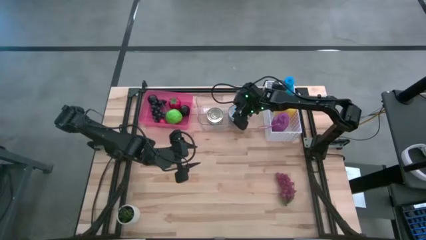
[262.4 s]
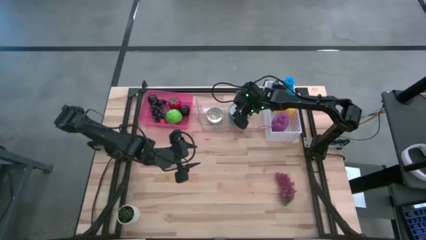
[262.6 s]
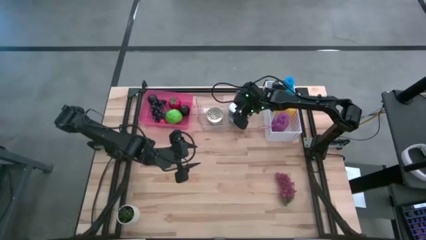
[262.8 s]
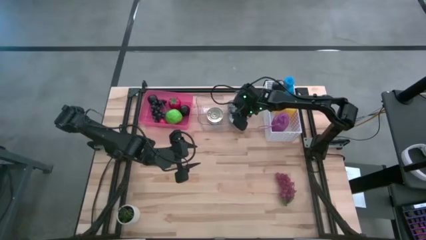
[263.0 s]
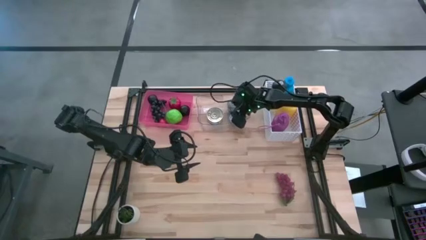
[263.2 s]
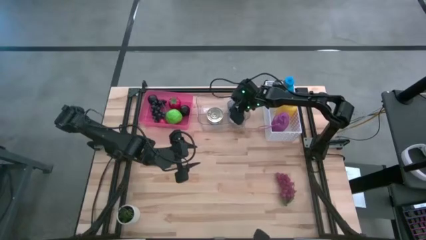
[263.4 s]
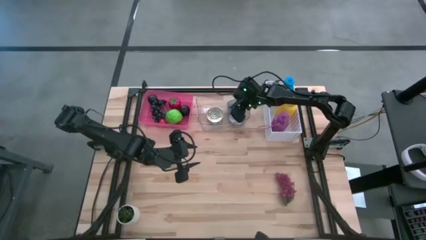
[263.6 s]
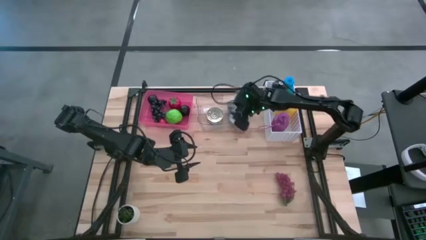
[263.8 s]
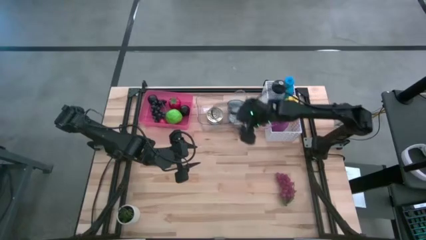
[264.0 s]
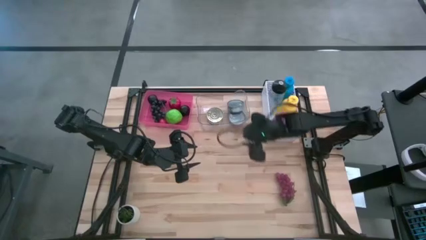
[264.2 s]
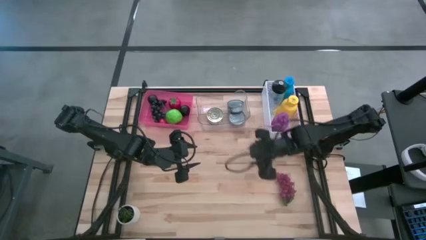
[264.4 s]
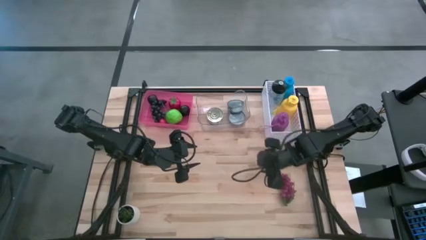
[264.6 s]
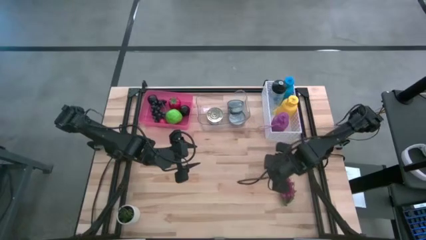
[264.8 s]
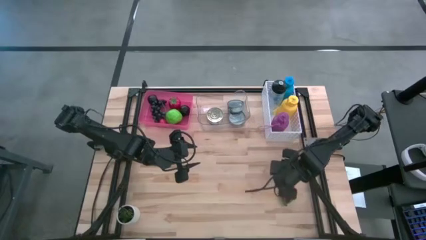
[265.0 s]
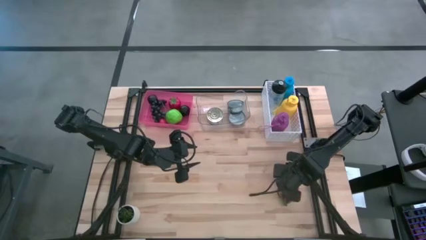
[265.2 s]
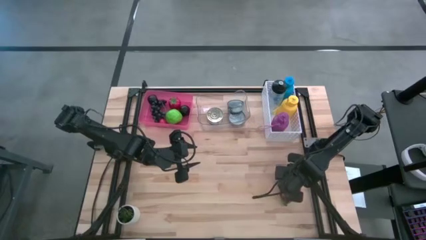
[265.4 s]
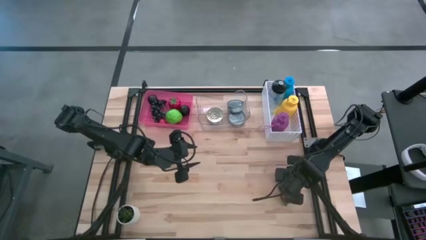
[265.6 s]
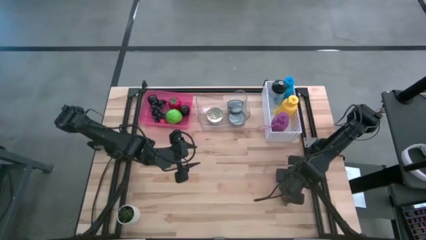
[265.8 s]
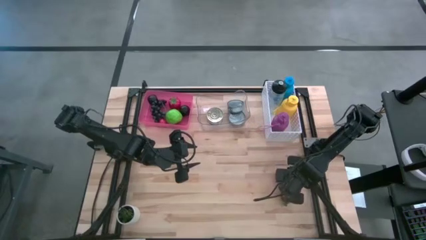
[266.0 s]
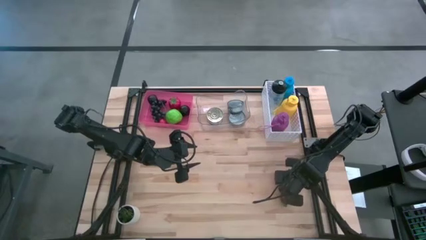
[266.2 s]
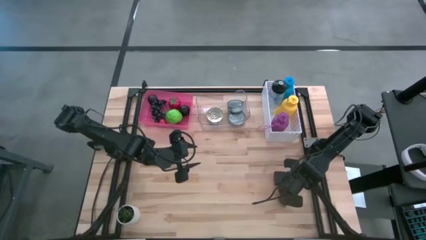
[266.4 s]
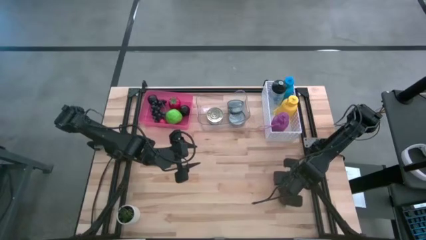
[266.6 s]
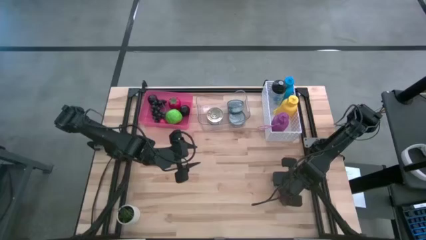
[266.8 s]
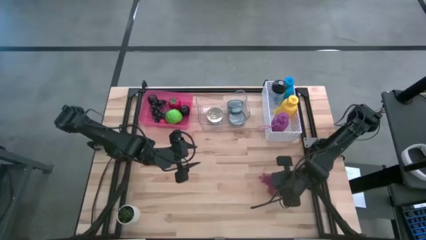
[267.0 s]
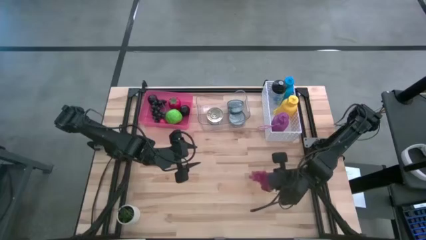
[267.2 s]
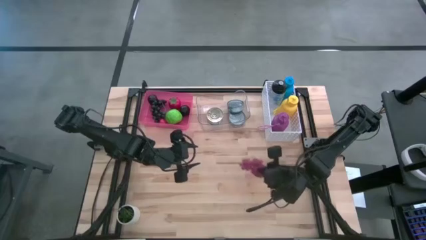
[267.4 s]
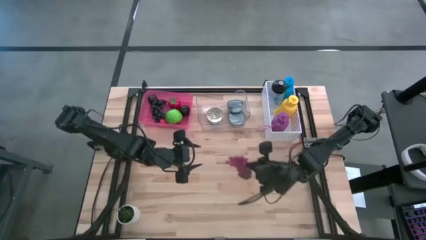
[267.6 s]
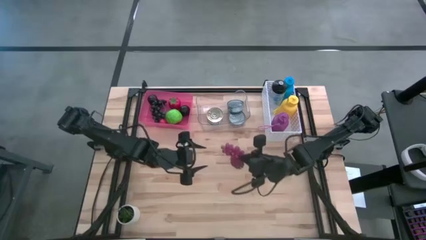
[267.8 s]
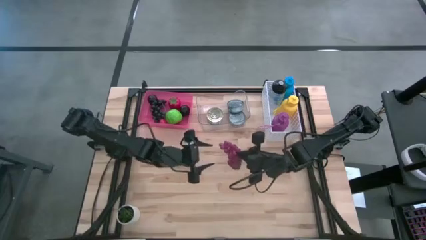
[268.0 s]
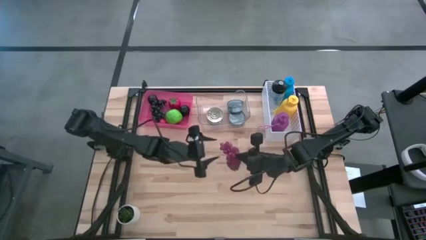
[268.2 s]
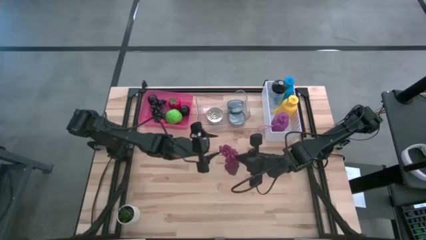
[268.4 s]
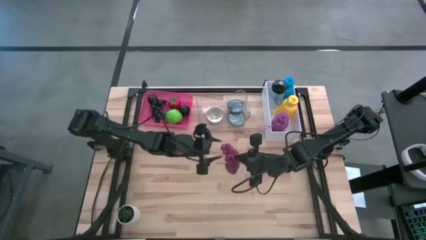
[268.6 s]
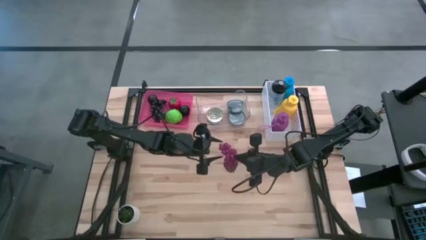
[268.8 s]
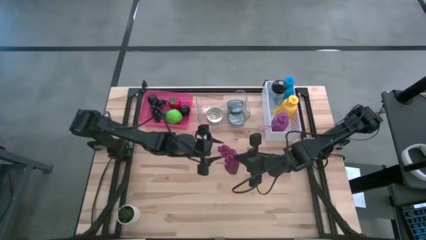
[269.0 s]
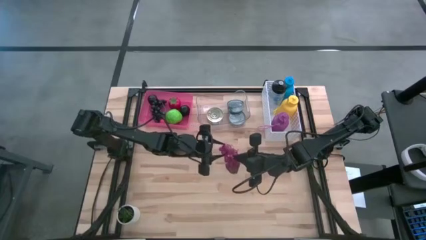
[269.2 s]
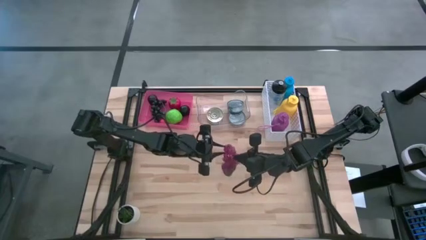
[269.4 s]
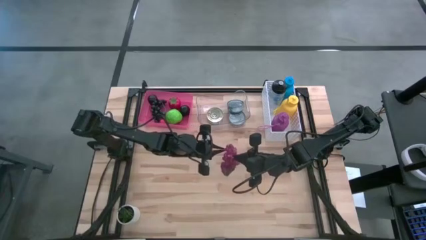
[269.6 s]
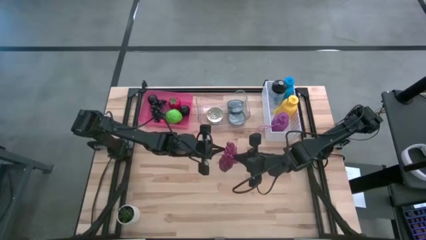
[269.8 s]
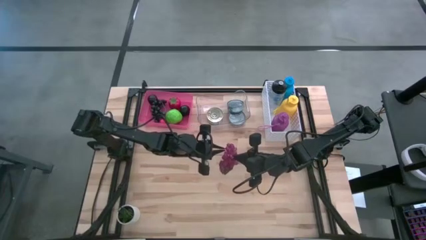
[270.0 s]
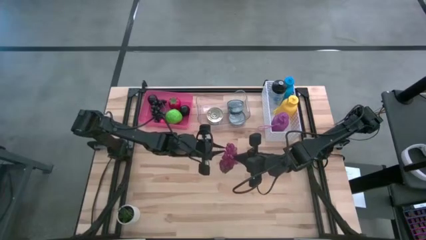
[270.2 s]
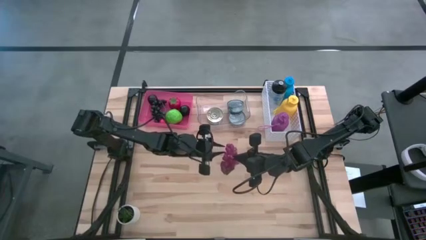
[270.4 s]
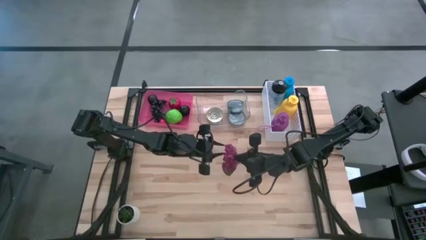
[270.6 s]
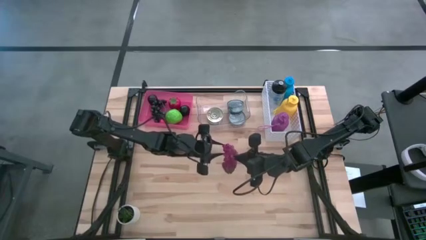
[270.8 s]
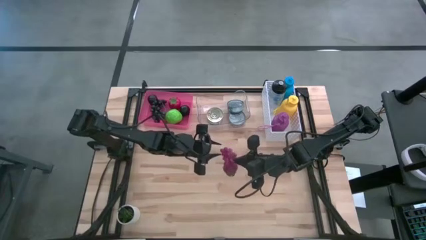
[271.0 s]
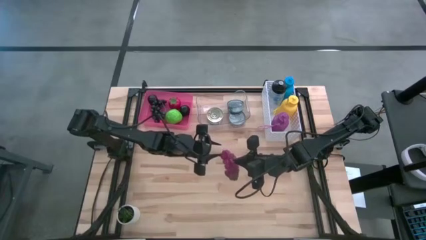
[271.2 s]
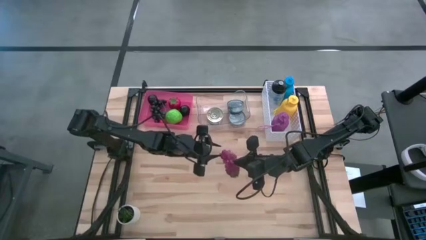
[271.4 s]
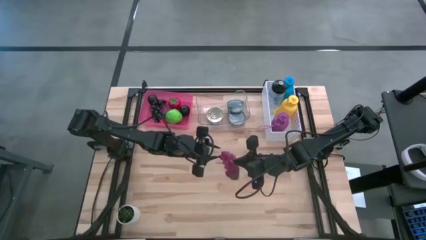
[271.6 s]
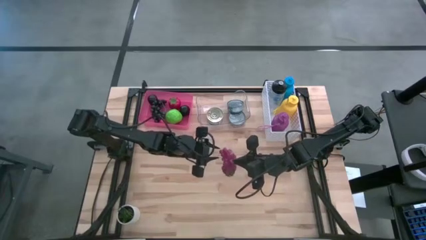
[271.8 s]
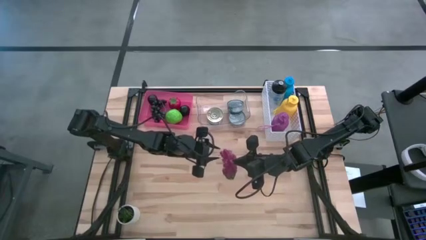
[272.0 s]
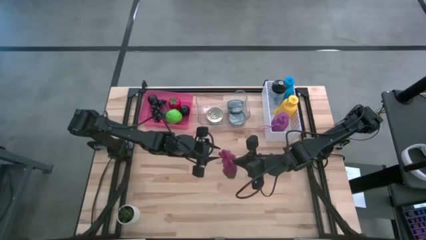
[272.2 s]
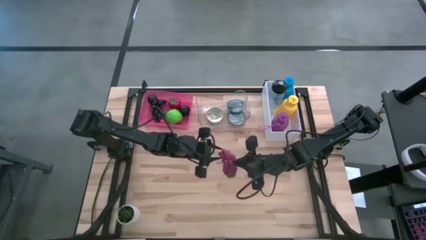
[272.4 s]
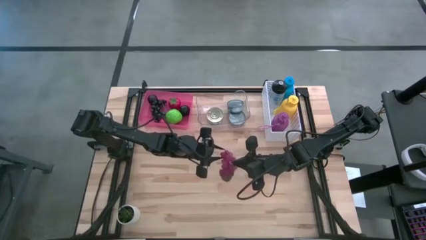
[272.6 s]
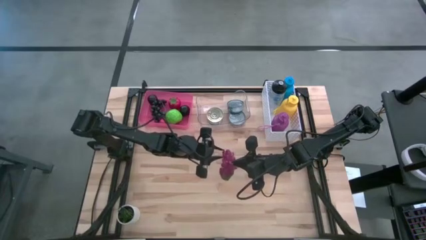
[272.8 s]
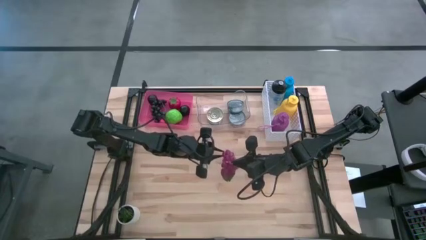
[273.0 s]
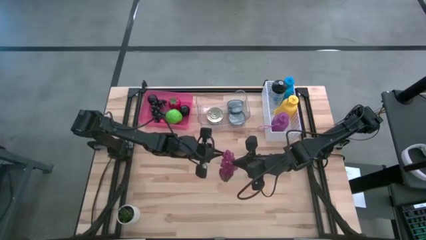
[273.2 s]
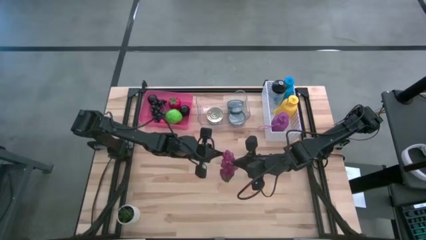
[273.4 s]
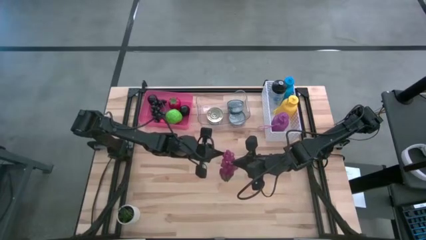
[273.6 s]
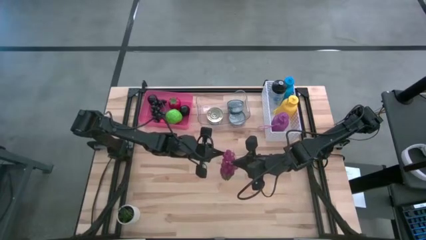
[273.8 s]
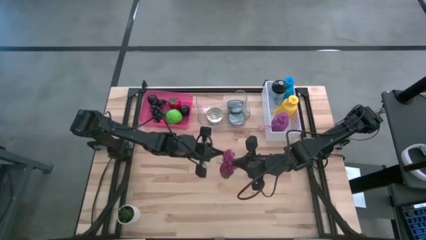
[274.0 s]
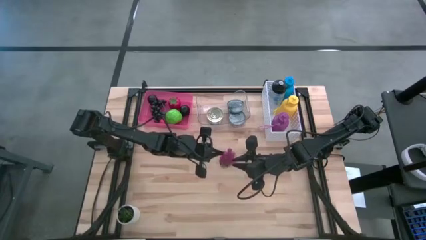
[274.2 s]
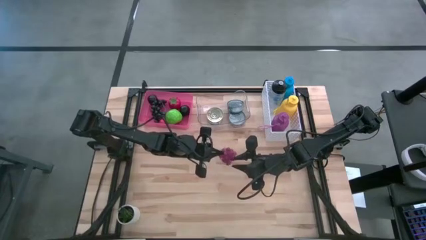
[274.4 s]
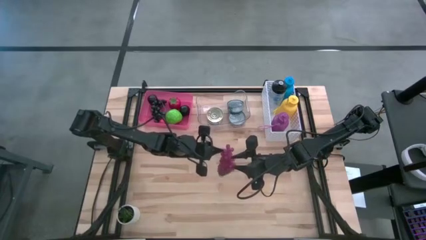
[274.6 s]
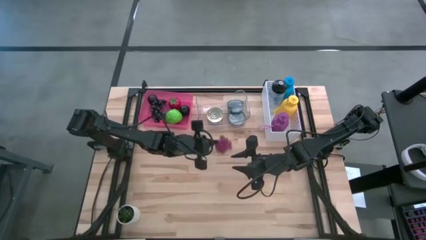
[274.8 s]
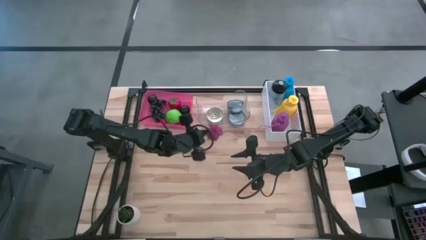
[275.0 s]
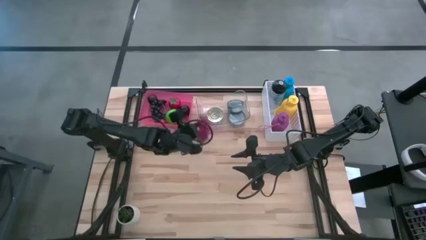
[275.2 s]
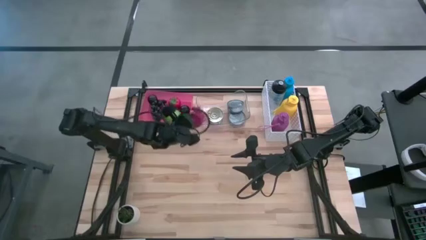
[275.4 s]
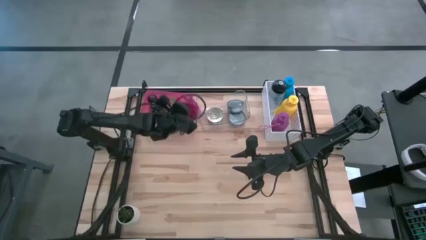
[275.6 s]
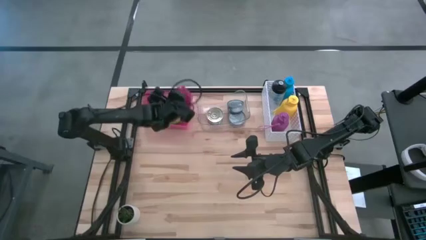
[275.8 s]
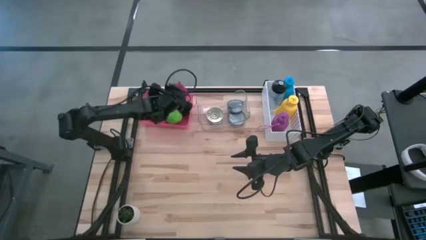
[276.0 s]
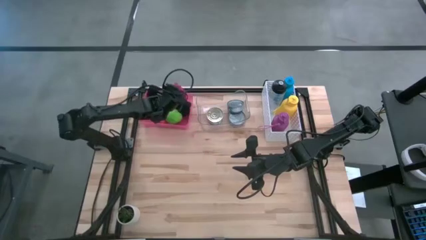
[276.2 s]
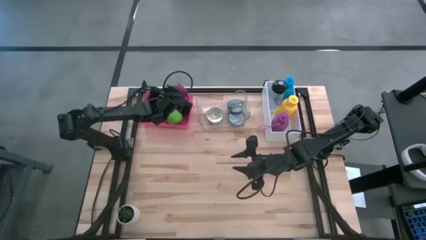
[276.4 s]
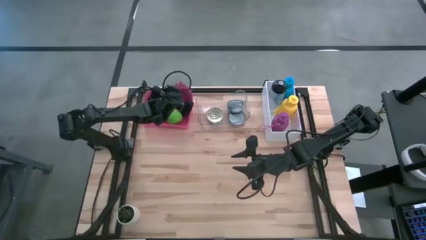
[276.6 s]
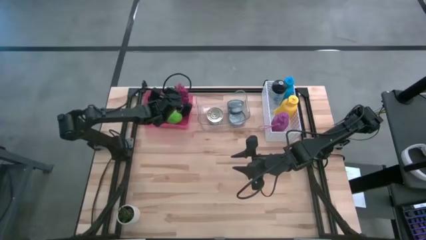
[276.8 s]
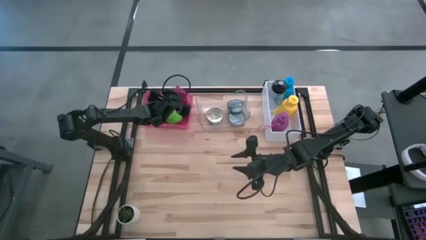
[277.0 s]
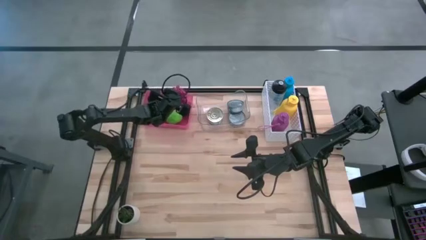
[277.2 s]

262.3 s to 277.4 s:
Task: Pick & Place Food Item
Put the grapes into the pink bin
